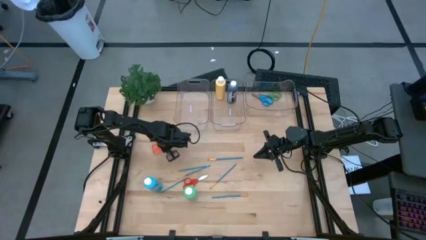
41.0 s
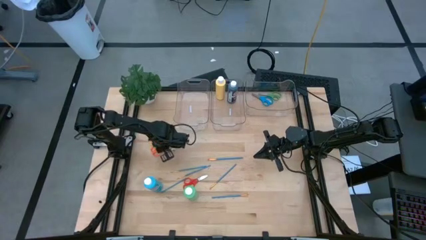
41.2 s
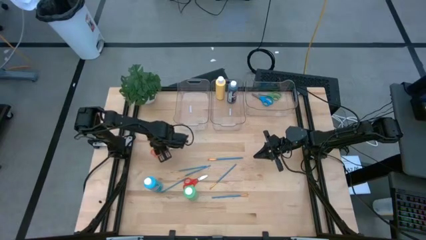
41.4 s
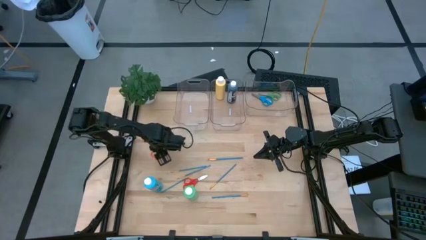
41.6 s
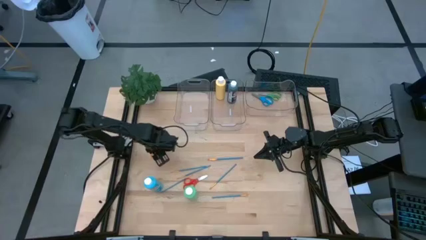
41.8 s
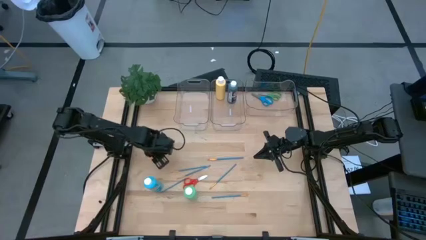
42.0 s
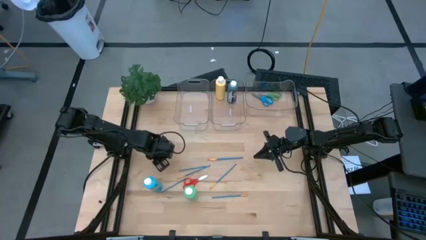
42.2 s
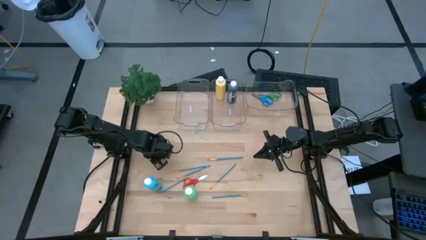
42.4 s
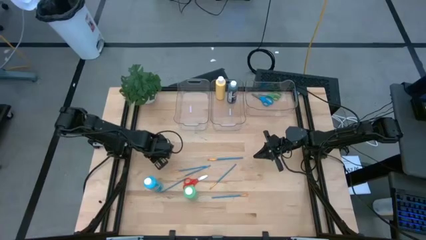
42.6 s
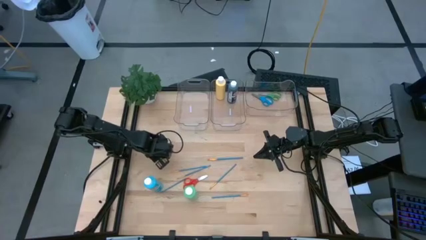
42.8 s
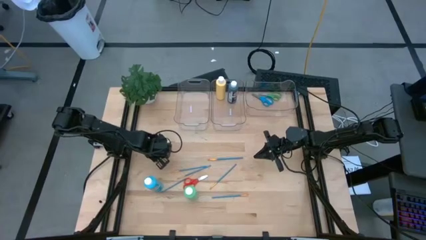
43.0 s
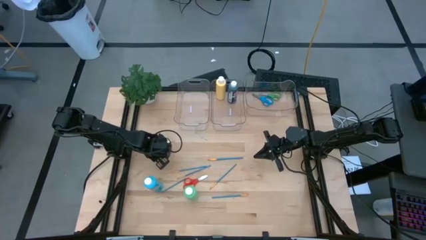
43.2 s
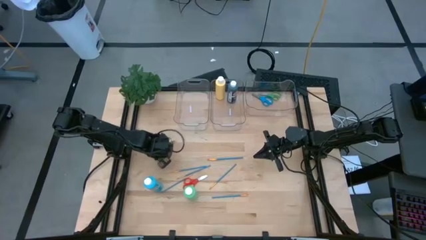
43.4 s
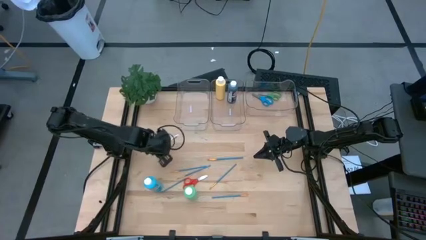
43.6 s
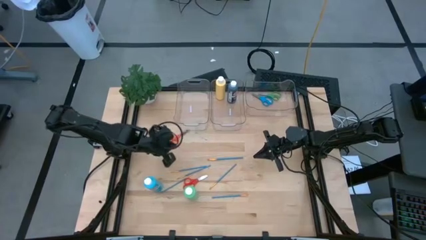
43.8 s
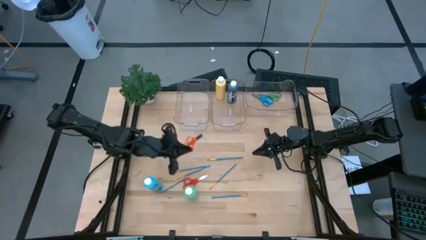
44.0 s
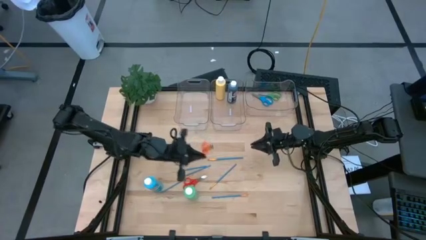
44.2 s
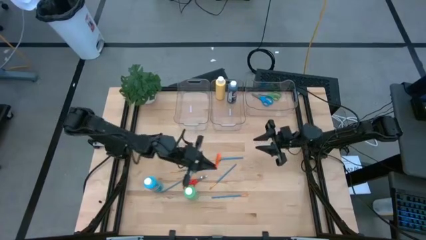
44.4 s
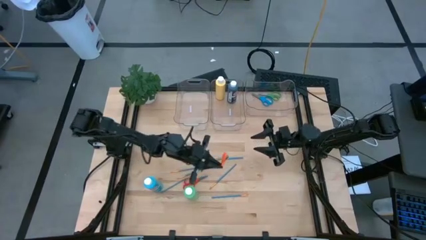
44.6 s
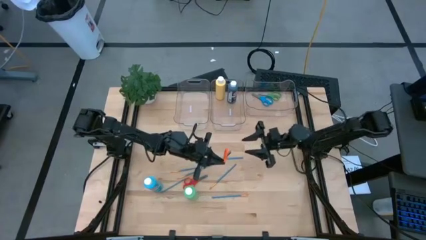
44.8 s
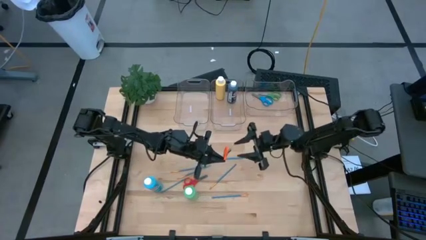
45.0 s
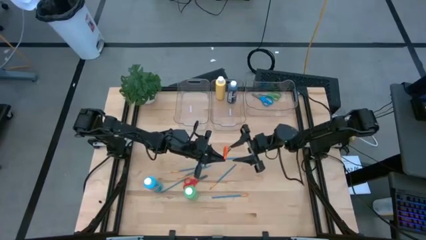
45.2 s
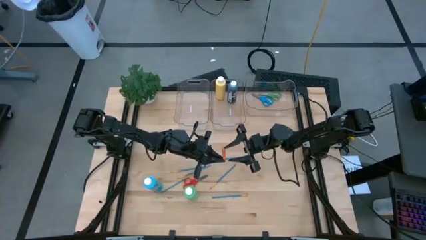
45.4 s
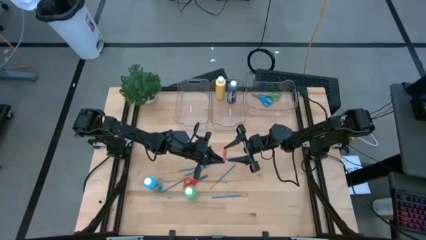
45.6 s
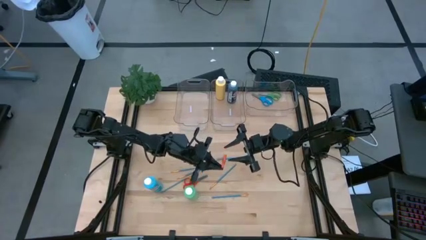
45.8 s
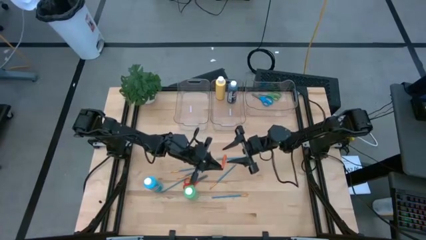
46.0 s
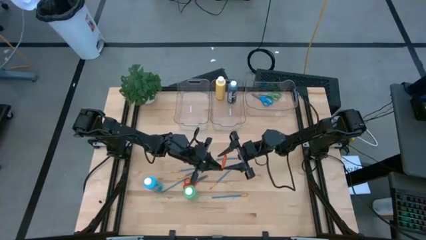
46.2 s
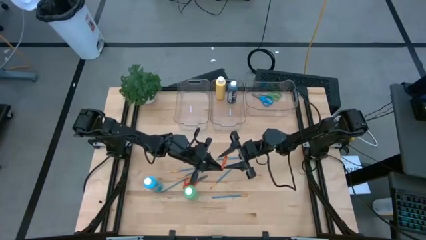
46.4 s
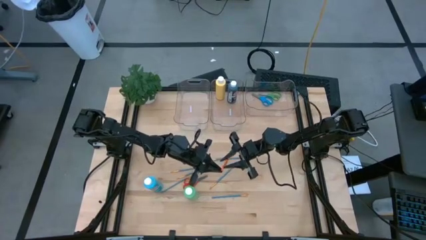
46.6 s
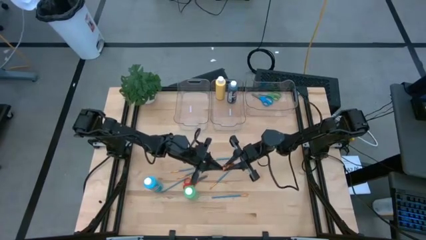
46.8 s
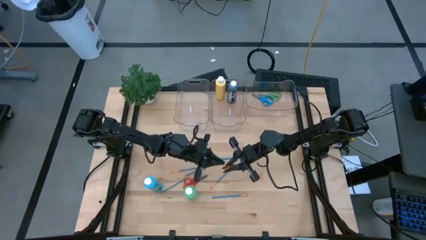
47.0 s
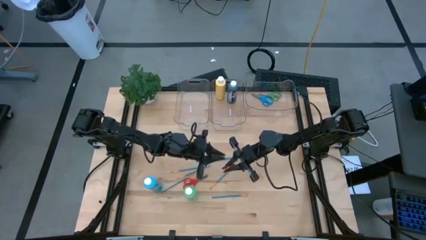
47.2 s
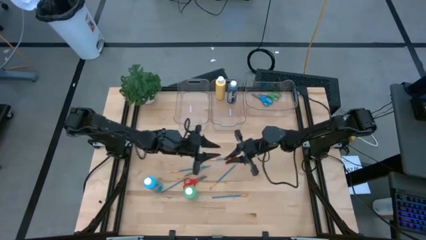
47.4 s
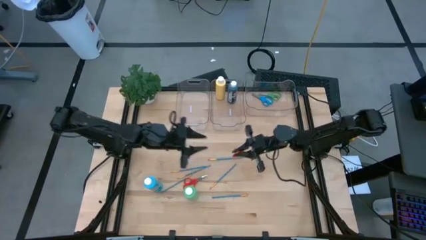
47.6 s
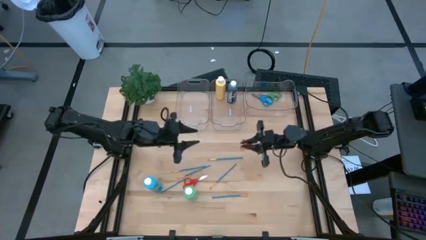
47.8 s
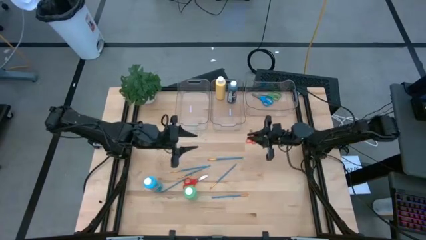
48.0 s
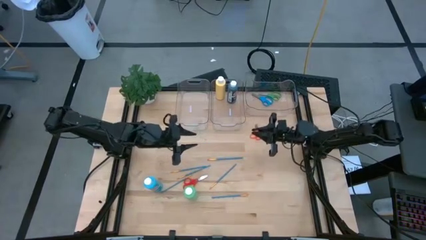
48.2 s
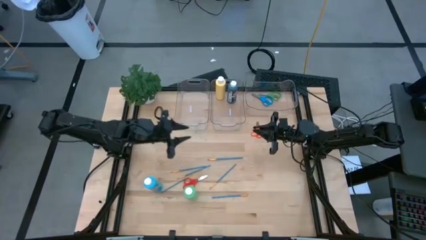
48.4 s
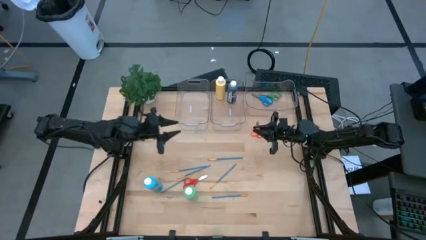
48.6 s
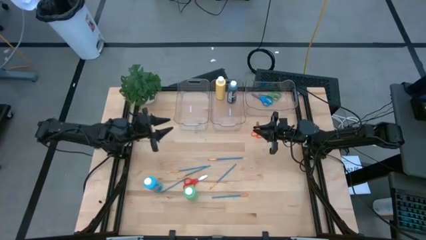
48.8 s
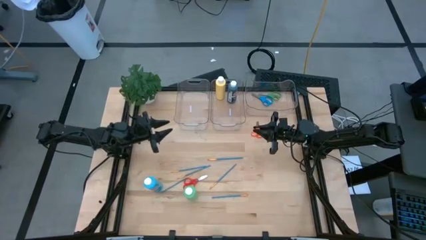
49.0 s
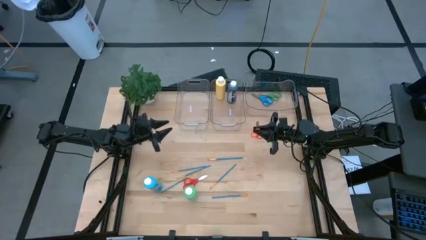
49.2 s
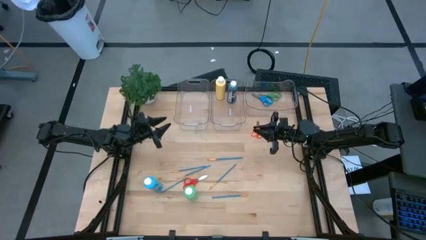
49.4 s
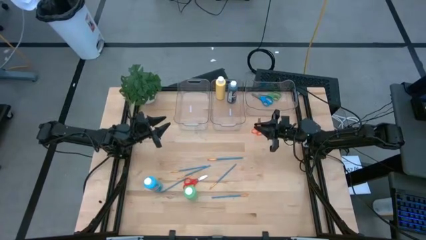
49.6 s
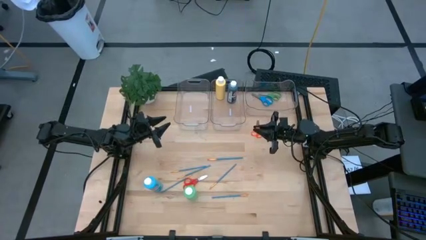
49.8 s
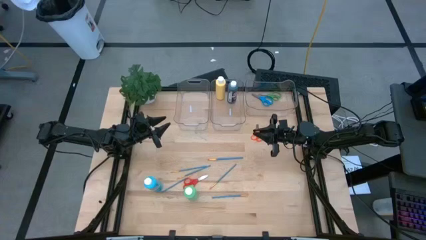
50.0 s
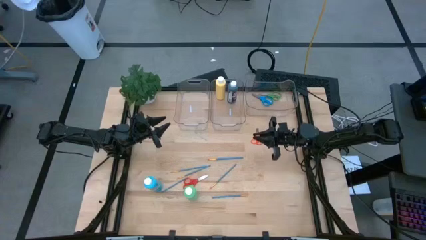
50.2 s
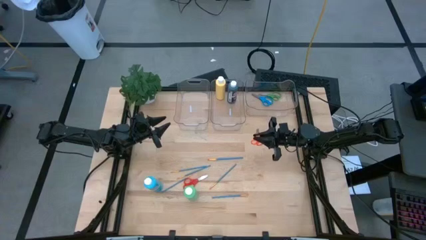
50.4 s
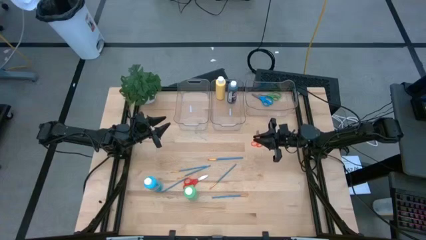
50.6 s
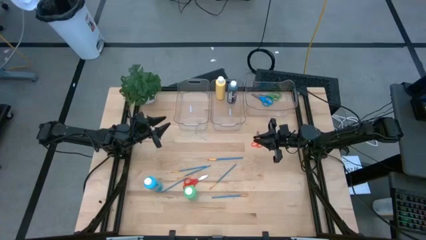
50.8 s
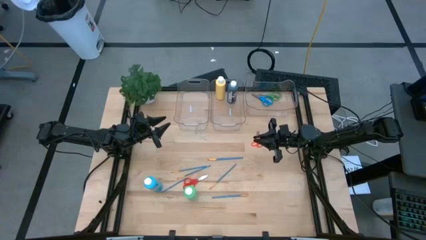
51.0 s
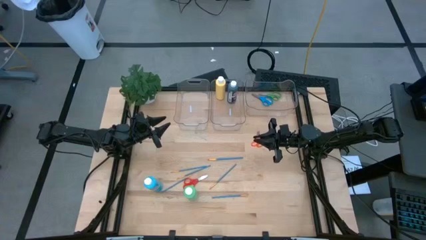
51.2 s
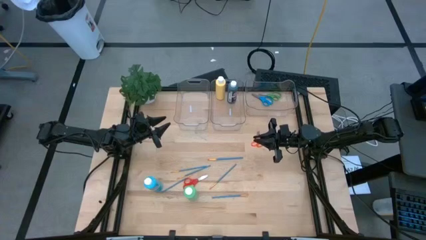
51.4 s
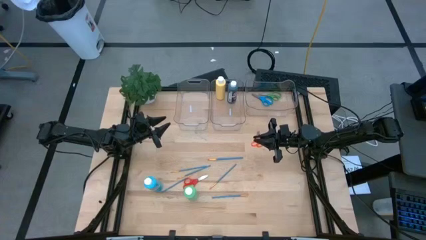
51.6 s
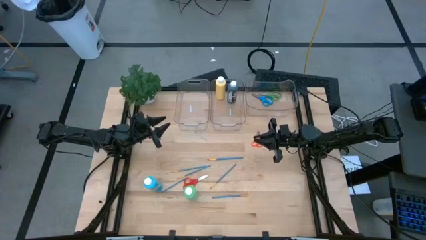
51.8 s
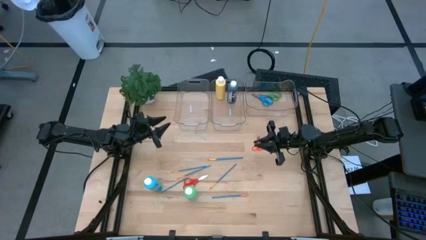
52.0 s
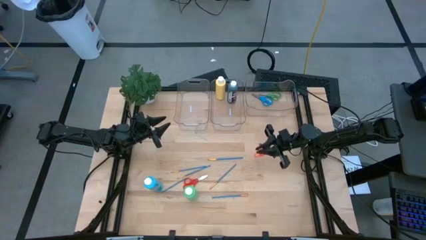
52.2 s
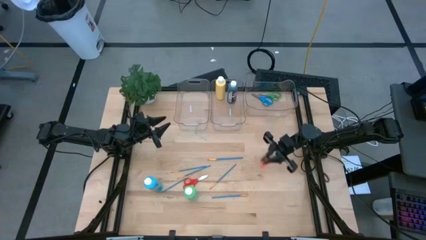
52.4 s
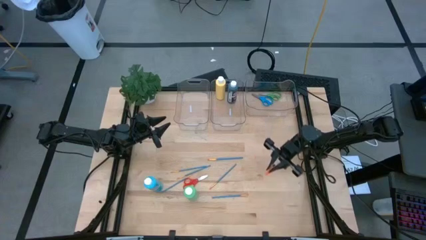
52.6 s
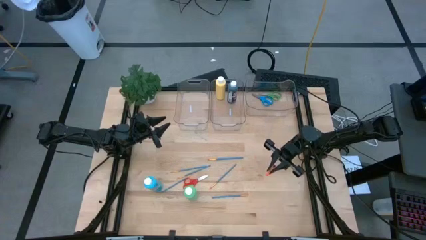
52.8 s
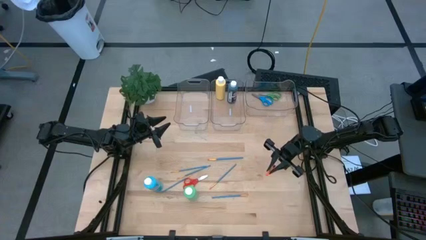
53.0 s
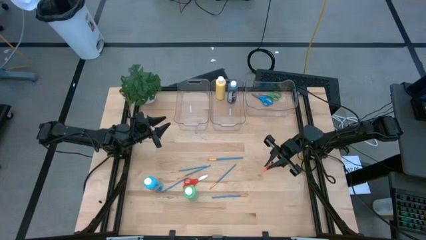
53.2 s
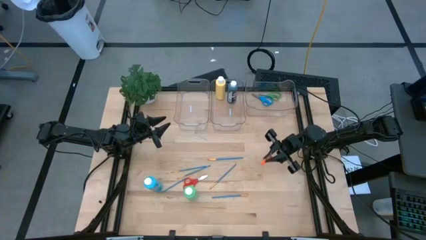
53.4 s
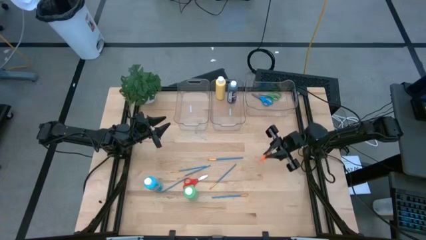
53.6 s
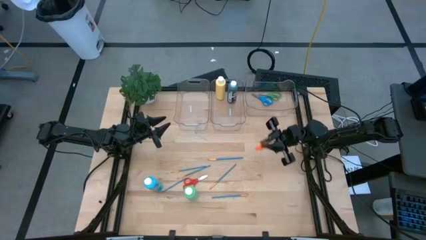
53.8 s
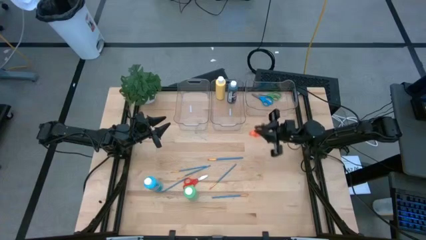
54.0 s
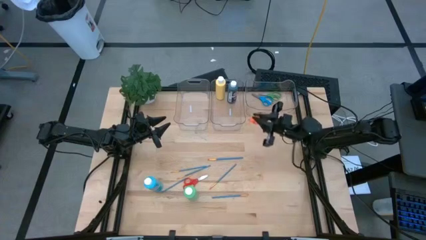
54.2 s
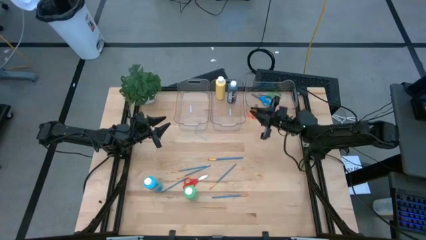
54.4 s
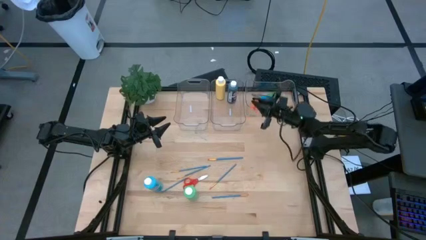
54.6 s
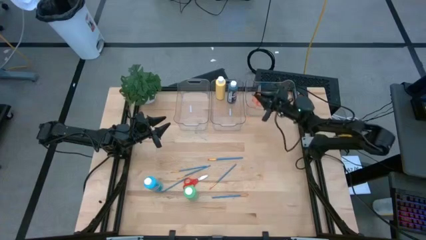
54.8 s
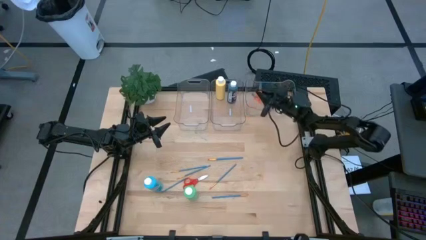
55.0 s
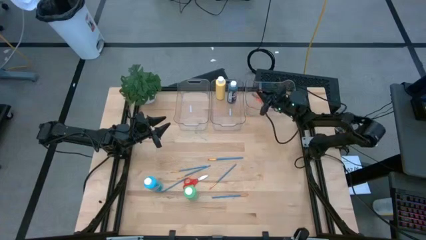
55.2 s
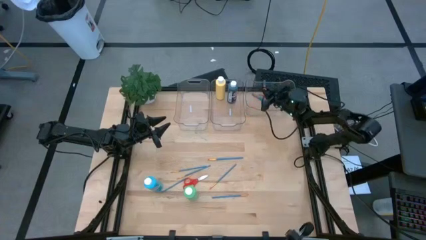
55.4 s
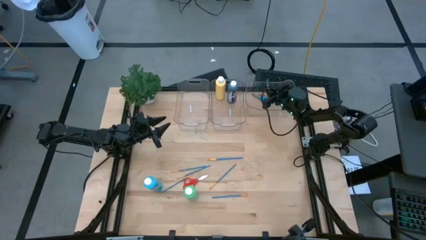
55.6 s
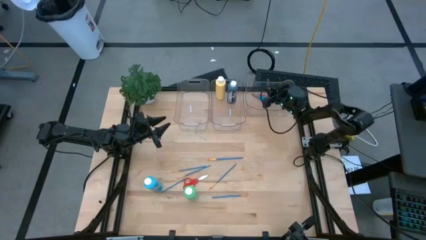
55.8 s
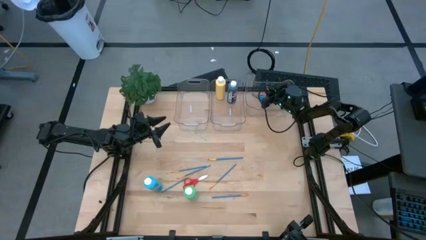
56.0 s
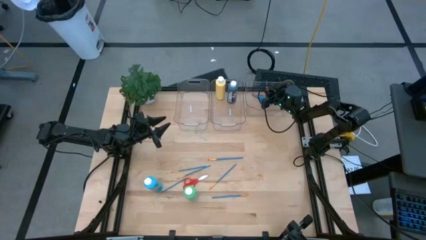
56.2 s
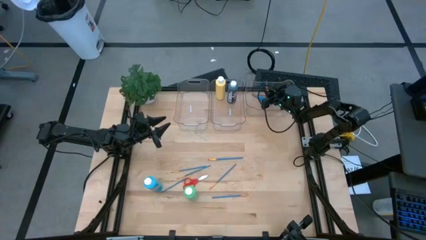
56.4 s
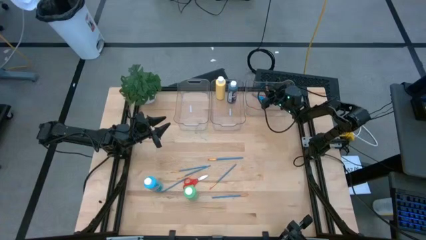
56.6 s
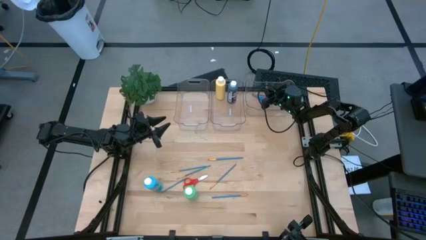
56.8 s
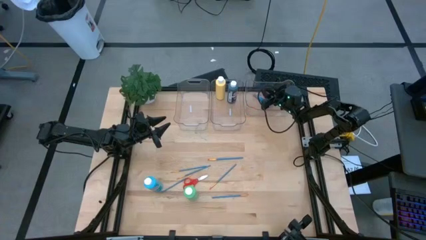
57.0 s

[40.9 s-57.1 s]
Task: Pick & Place Paint Supplies
Put the orange scissors into the right transparent bin
